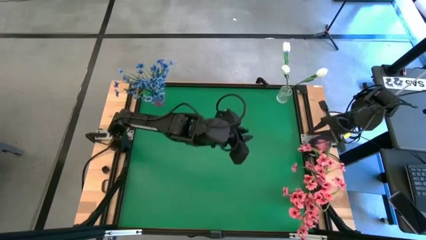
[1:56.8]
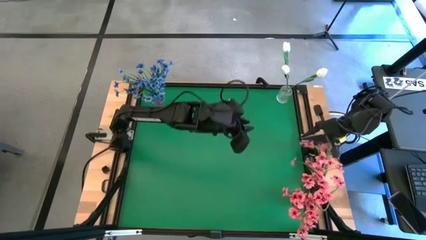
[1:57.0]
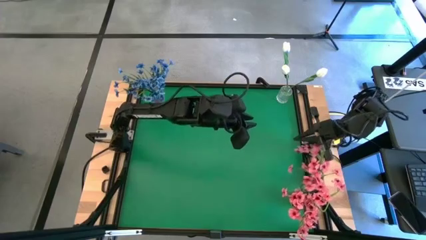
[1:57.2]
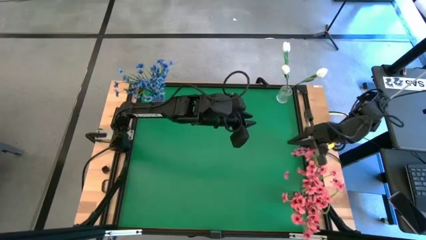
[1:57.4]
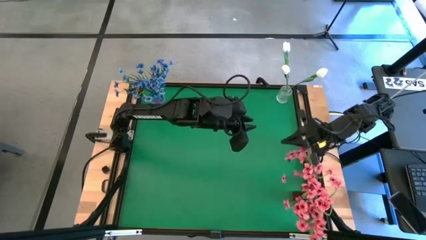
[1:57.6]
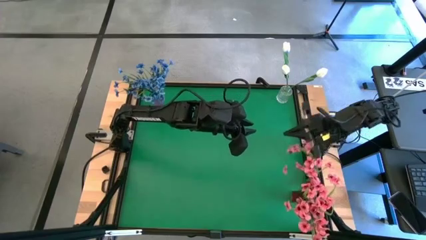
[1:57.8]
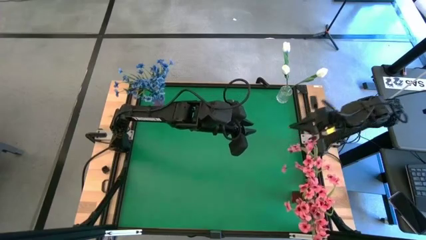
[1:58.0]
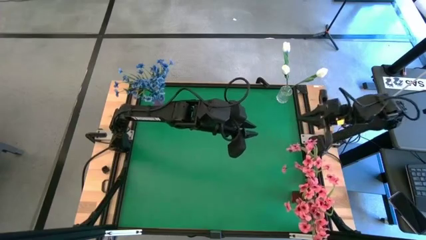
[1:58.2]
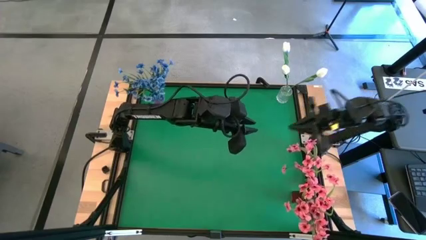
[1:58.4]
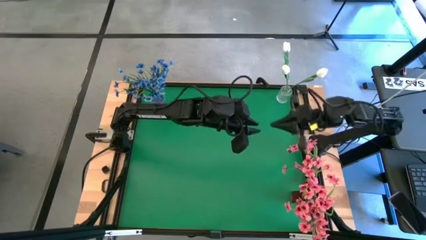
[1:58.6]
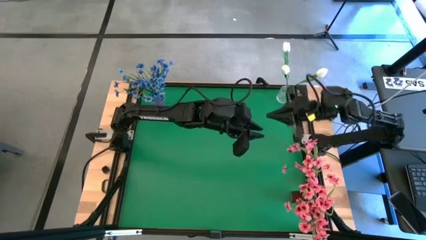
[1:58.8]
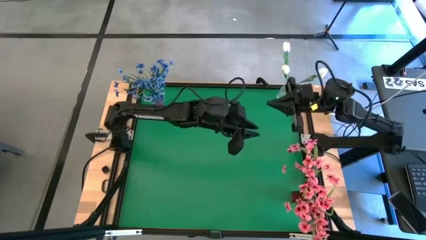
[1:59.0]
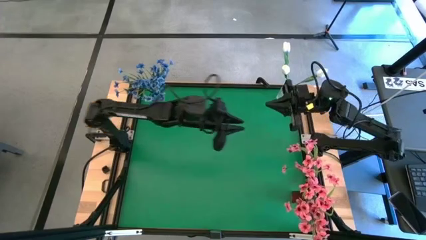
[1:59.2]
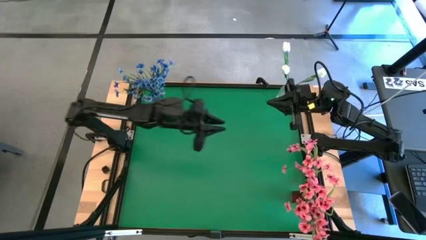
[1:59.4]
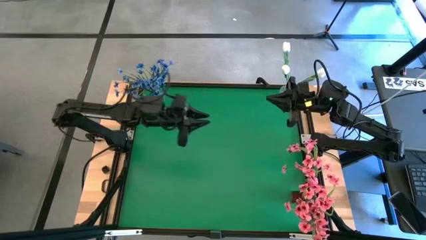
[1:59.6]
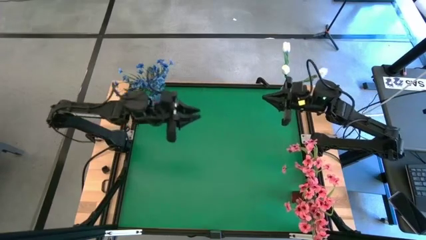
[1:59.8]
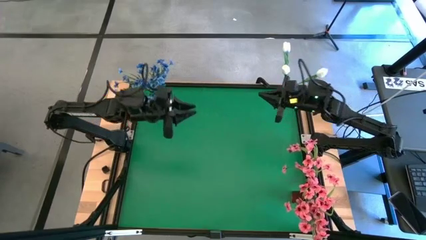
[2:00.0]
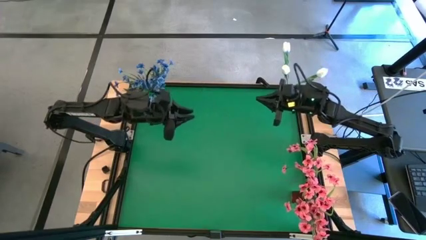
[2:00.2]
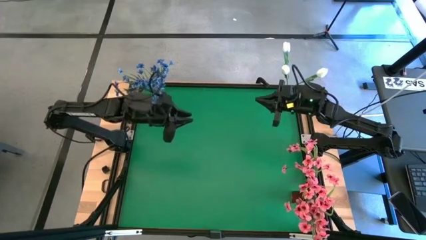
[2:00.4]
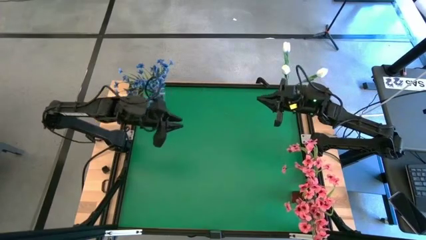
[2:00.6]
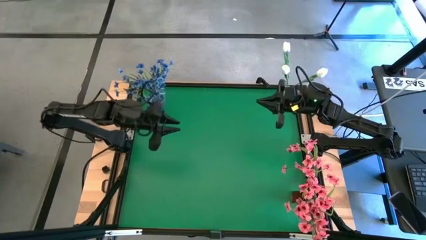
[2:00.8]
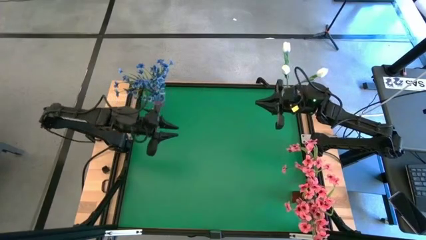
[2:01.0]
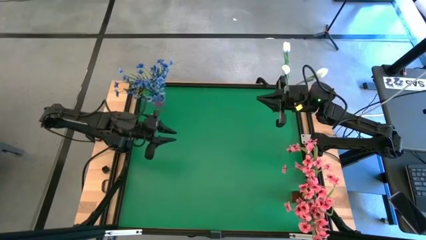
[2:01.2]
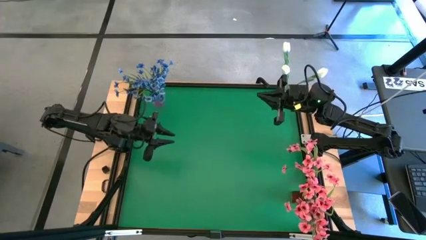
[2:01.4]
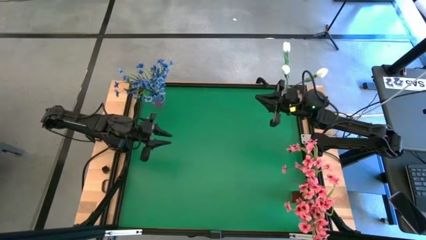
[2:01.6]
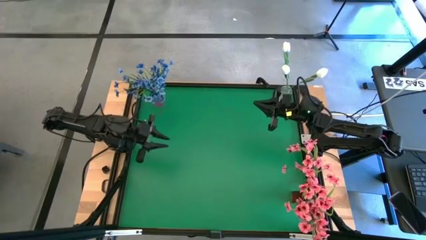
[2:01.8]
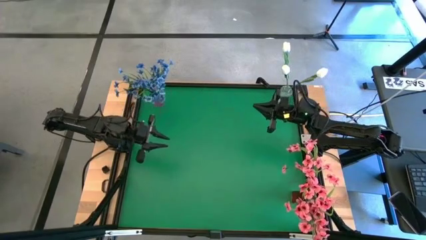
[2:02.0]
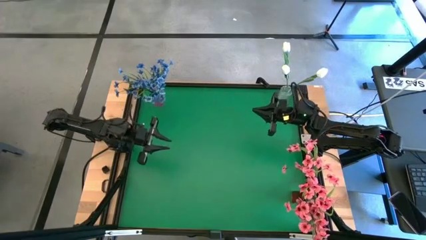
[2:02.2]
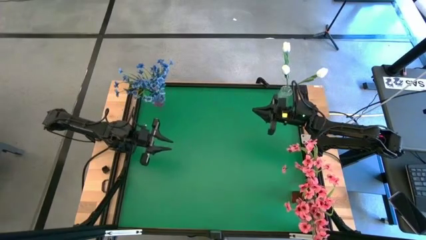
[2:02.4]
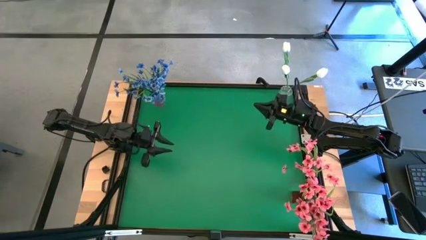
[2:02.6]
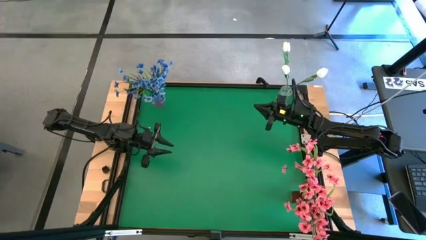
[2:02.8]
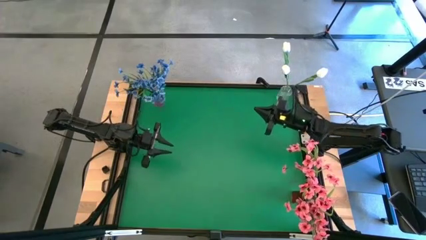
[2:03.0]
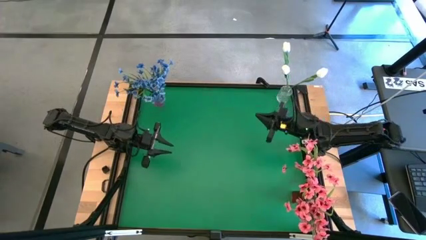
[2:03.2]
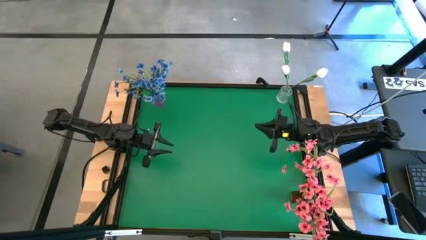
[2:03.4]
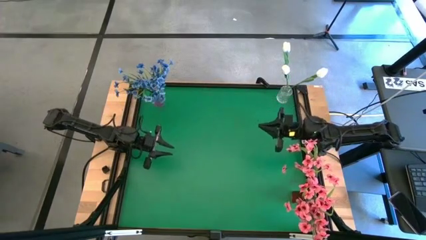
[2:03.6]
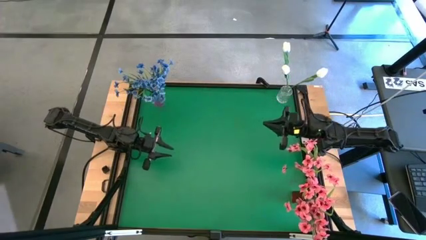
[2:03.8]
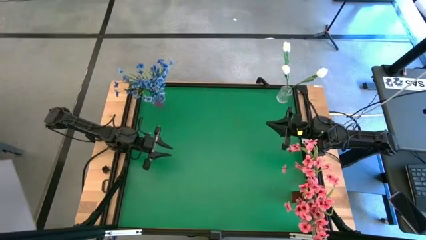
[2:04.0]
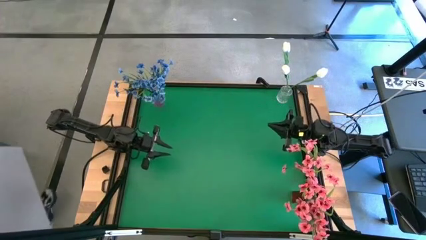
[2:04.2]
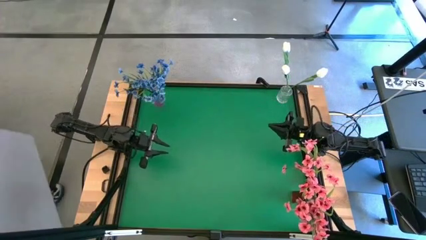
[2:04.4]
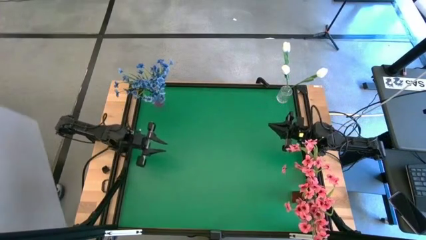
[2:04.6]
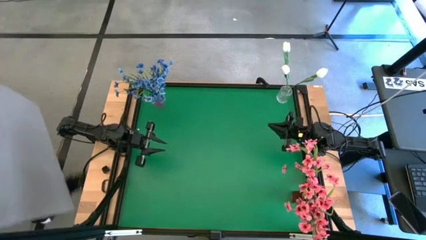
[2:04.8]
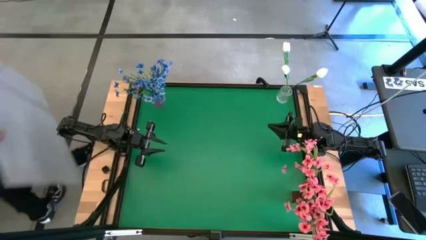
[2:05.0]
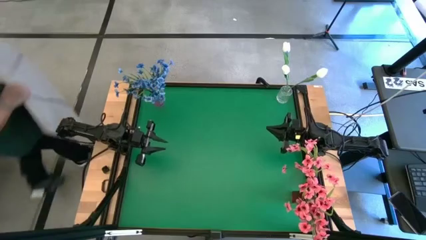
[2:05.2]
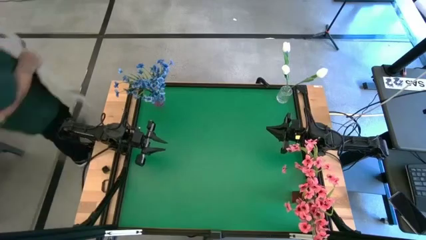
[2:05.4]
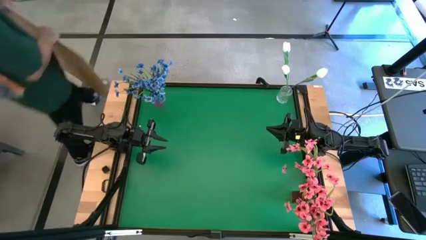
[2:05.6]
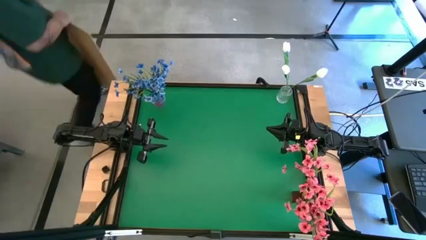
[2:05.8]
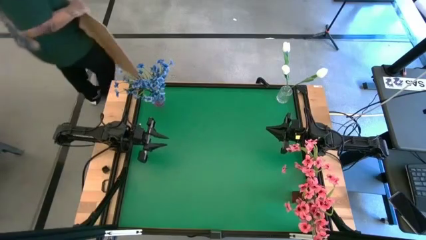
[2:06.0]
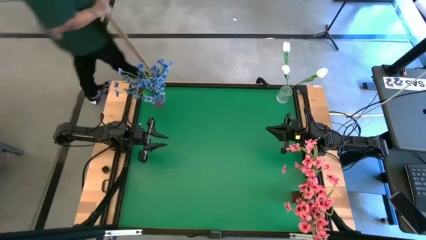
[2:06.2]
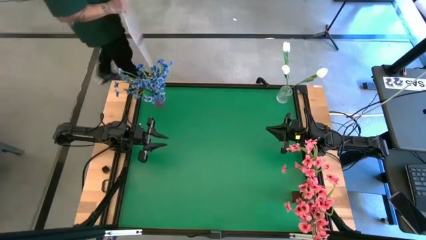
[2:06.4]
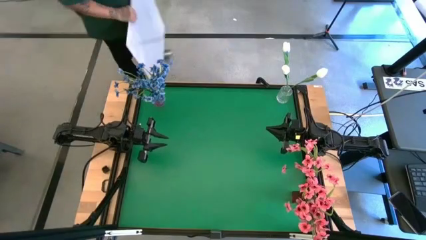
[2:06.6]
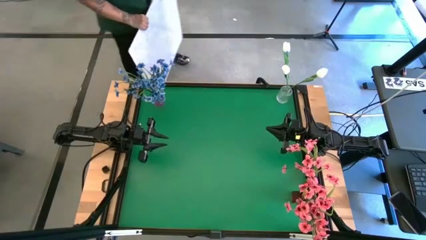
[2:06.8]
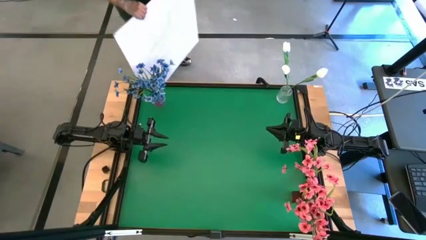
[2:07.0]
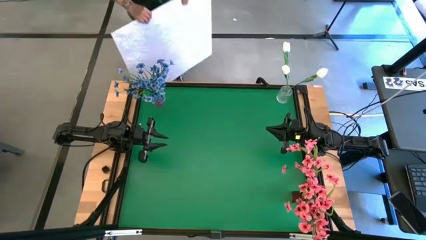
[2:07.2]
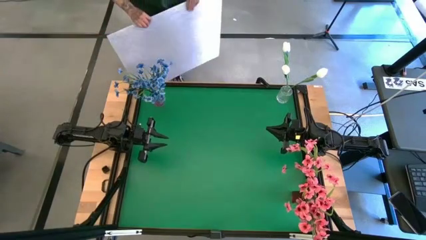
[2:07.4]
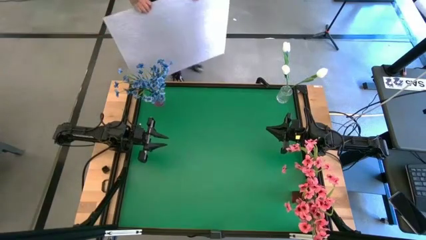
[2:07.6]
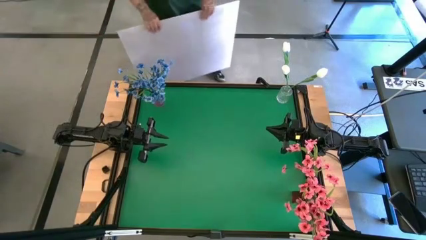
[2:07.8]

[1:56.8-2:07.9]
Task: Sort flowers into vase by color
Return to Home Position

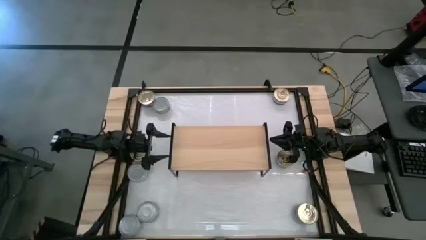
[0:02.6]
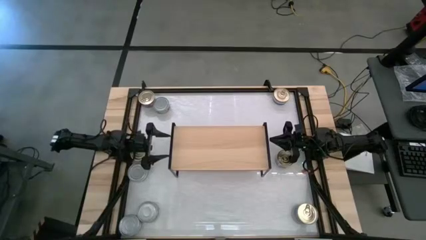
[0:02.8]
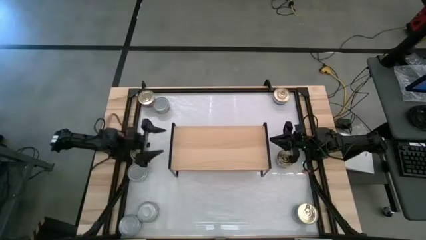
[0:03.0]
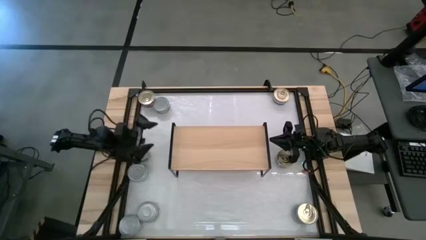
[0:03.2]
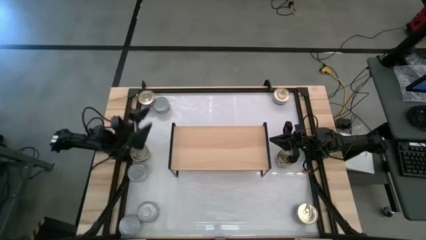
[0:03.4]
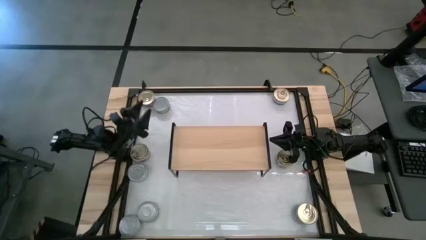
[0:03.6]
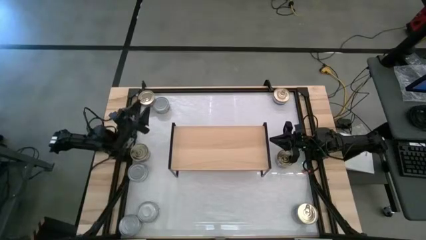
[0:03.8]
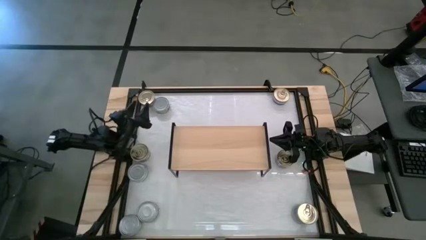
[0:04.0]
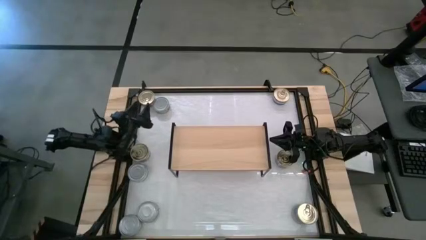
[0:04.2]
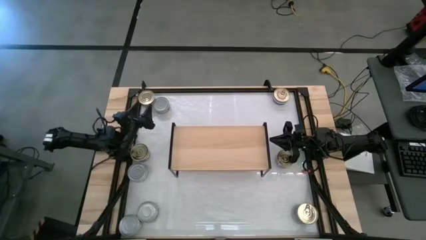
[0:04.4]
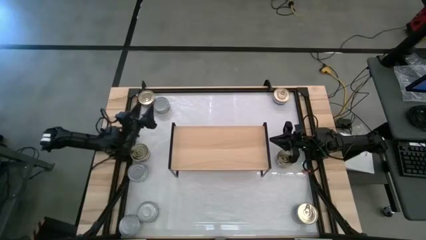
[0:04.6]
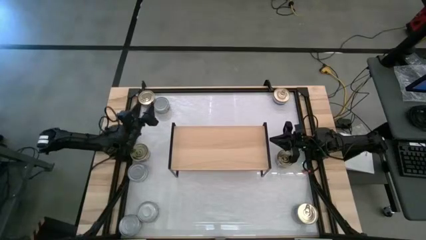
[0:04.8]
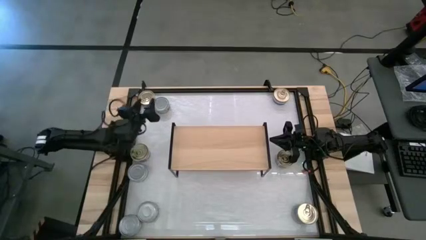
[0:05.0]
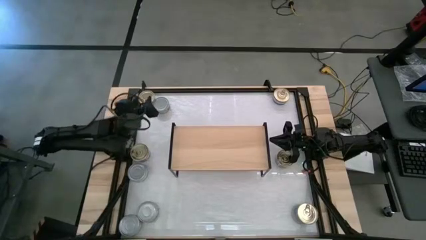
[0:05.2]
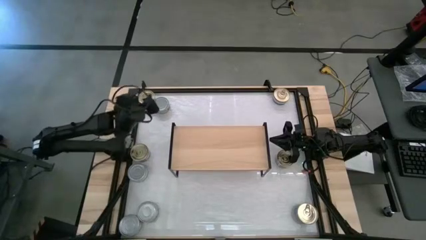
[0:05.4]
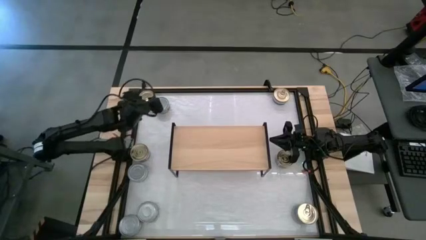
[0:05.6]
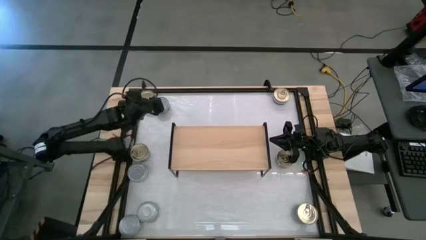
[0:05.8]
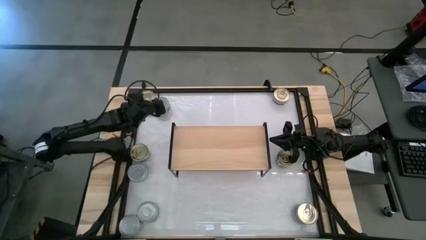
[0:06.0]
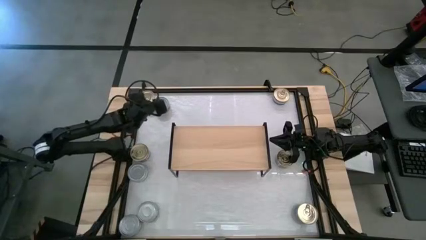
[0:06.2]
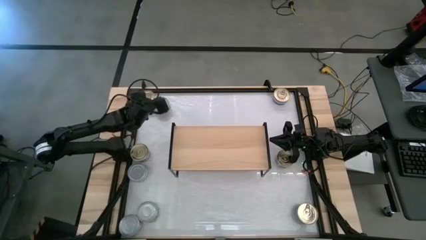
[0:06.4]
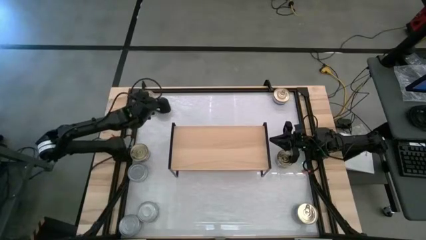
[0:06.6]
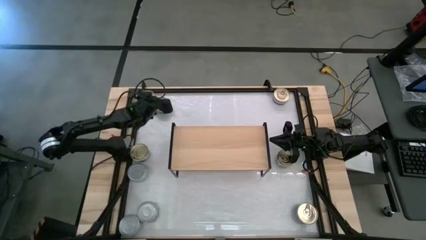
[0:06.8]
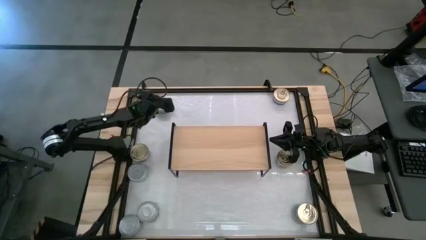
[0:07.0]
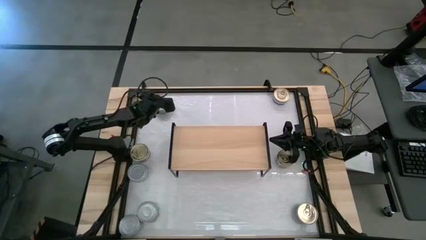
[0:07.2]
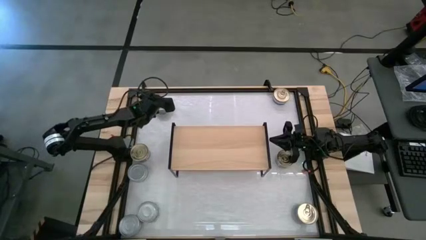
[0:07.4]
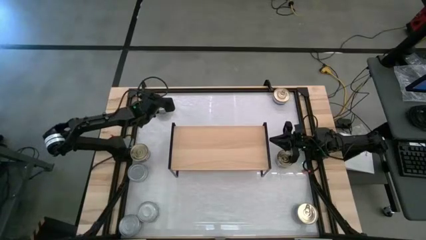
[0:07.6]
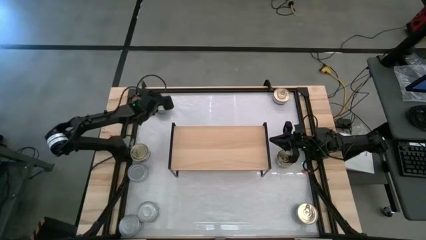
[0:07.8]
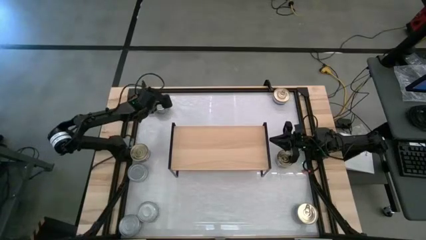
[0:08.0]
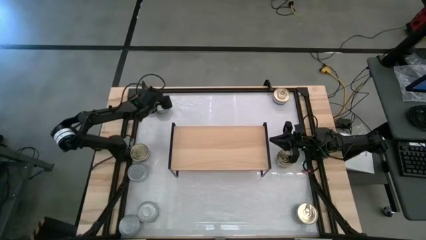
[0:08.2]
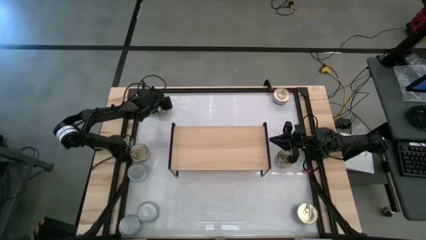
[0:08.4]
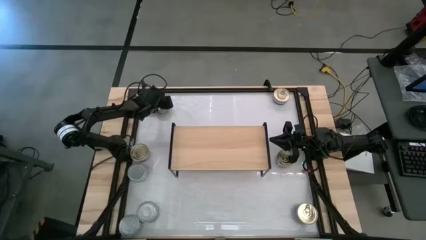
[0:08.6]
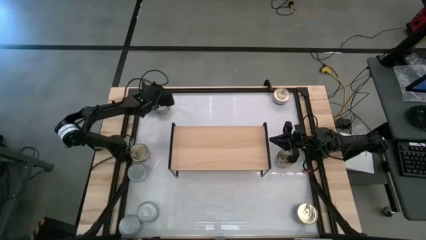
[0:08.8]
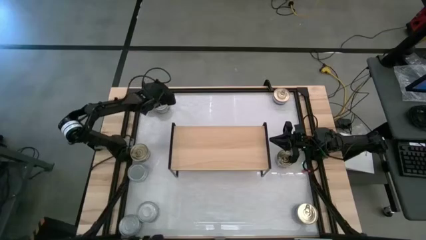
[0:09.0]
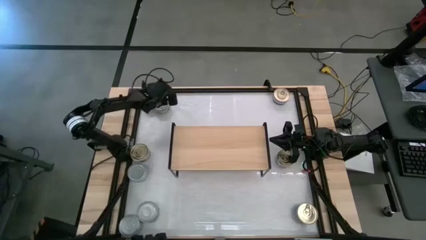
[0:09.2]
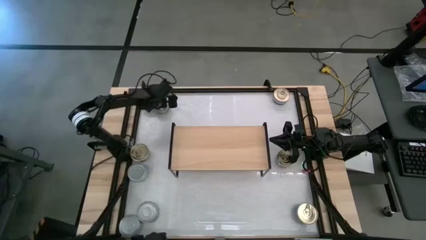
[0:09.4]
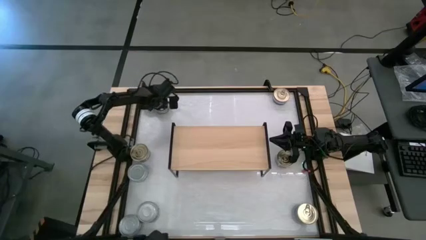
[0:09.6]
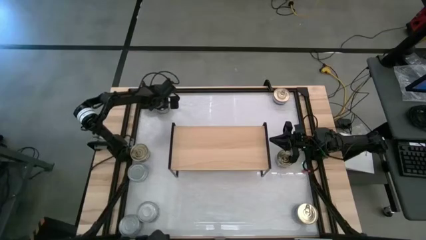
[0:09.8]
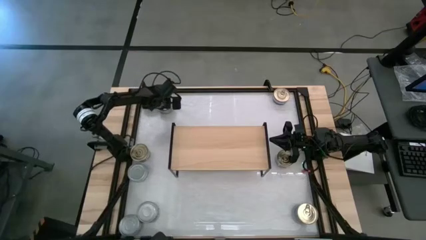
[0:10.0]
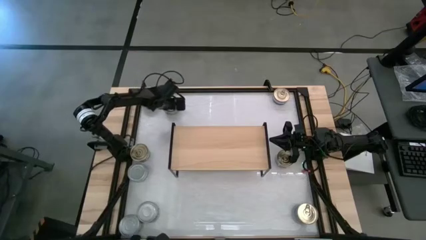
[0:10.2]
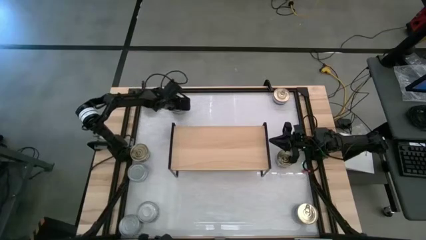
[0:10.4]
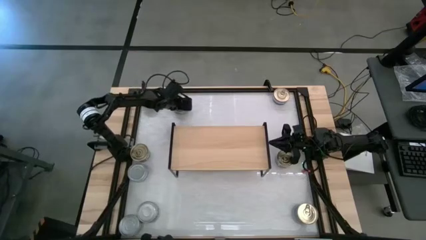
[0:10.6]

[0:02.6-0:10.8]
Task: Stack canned seafood by type on shelf
Move the green tuna can
